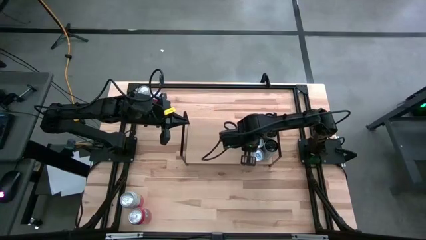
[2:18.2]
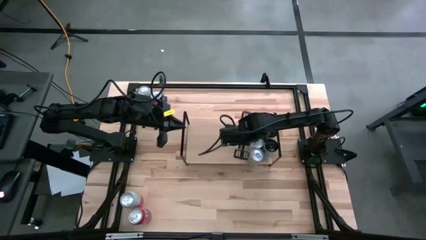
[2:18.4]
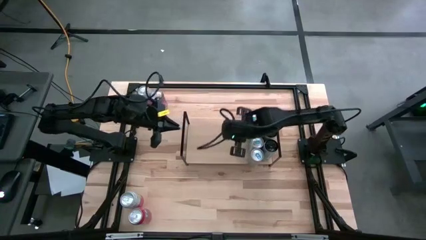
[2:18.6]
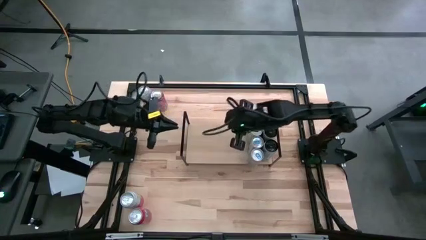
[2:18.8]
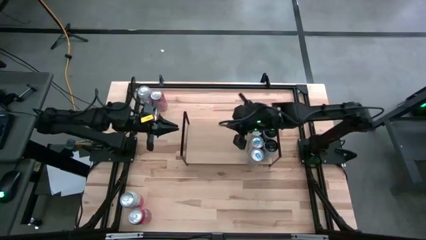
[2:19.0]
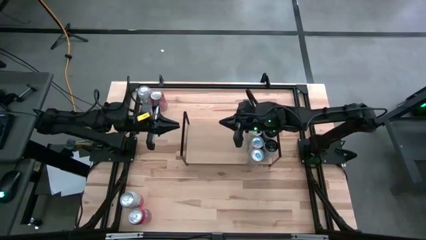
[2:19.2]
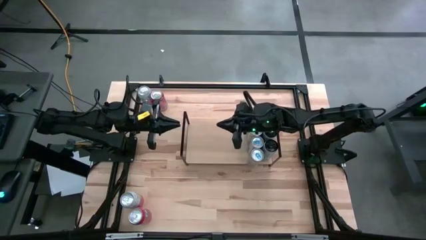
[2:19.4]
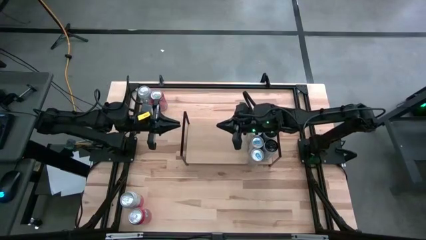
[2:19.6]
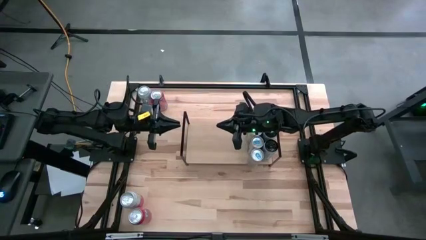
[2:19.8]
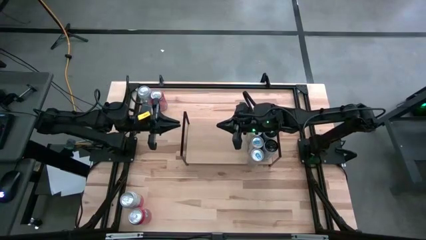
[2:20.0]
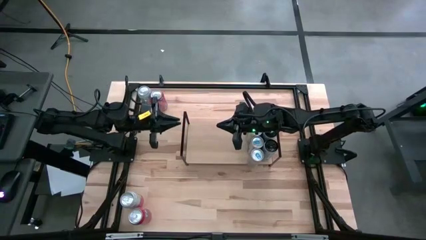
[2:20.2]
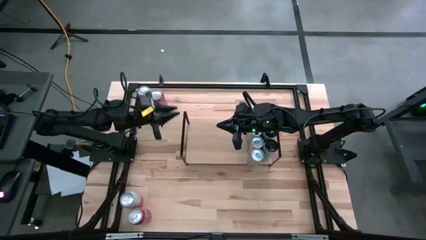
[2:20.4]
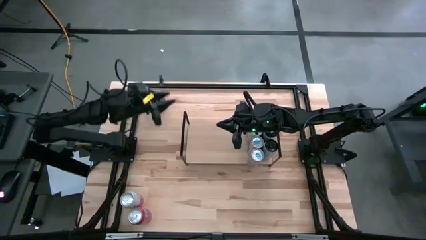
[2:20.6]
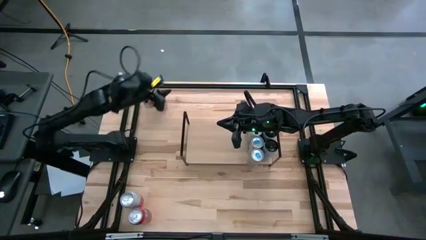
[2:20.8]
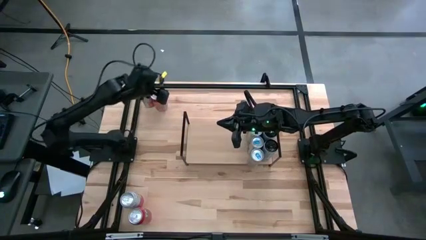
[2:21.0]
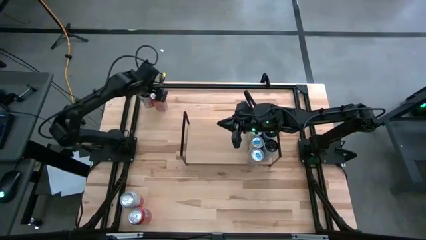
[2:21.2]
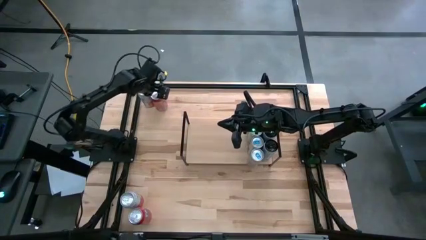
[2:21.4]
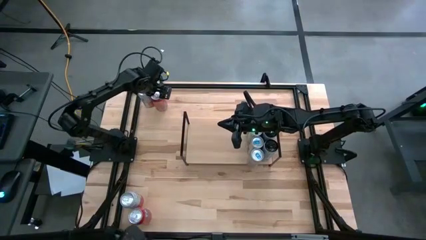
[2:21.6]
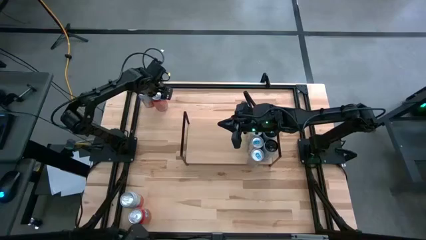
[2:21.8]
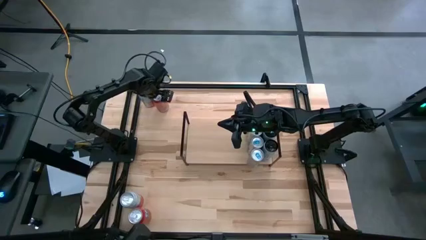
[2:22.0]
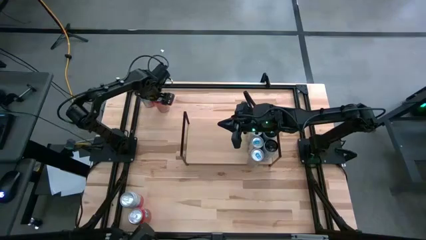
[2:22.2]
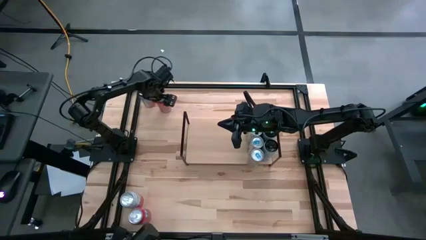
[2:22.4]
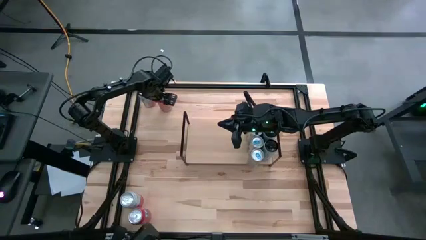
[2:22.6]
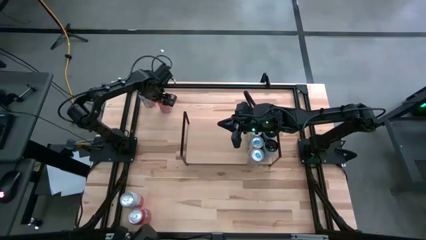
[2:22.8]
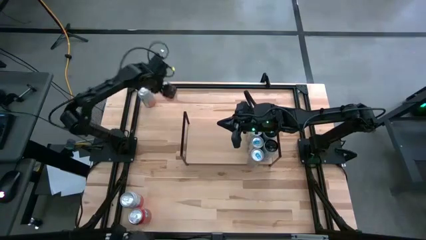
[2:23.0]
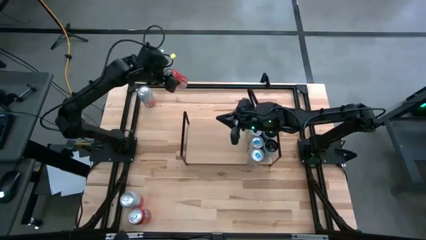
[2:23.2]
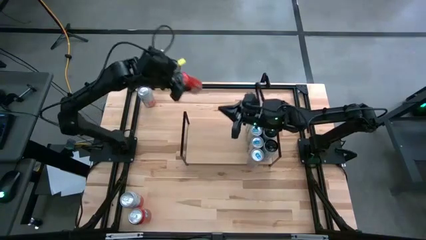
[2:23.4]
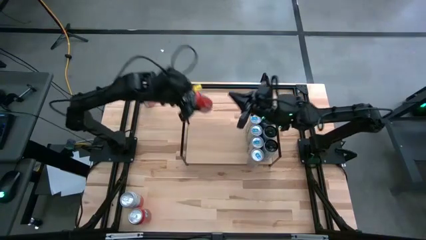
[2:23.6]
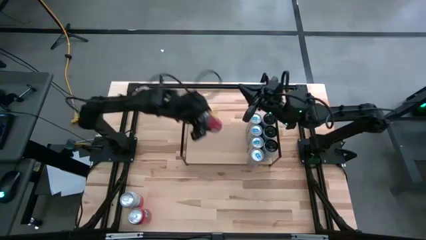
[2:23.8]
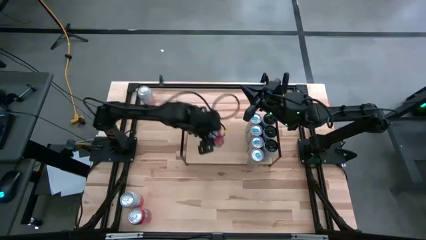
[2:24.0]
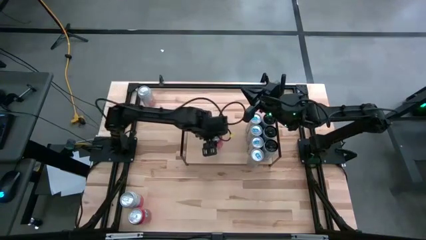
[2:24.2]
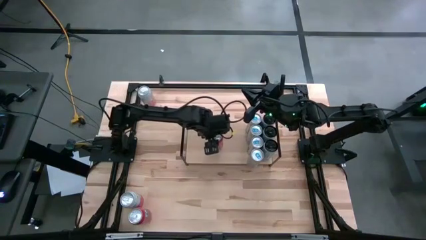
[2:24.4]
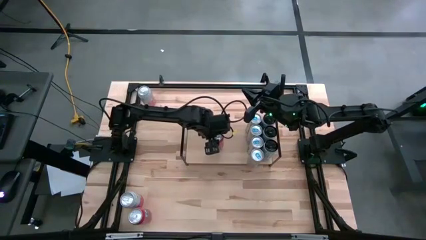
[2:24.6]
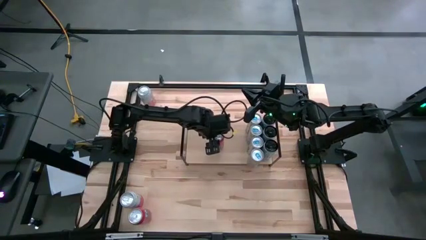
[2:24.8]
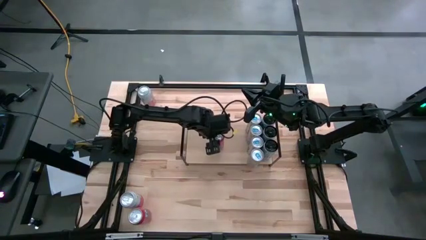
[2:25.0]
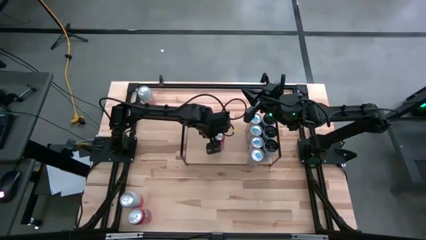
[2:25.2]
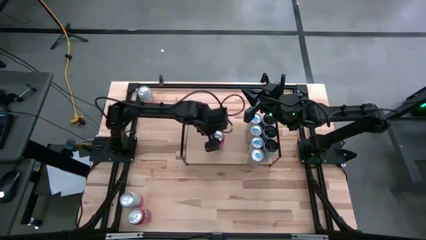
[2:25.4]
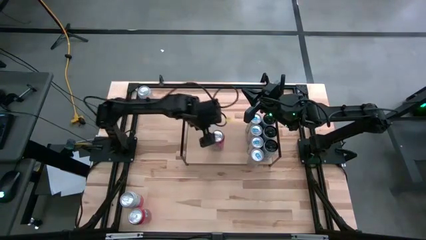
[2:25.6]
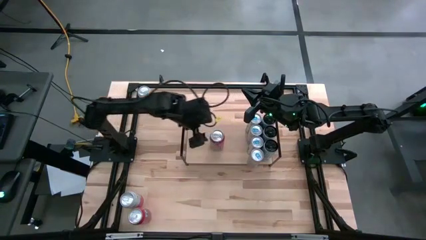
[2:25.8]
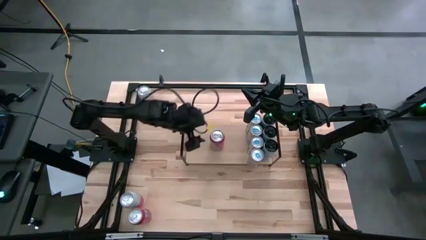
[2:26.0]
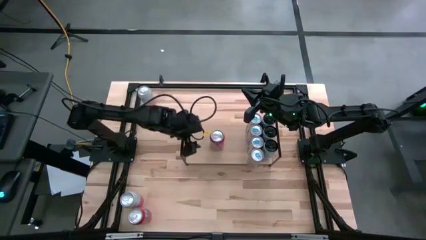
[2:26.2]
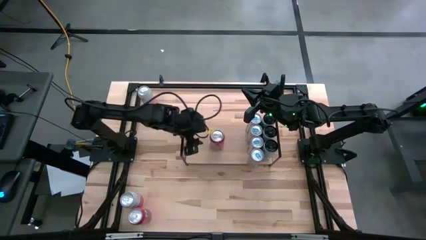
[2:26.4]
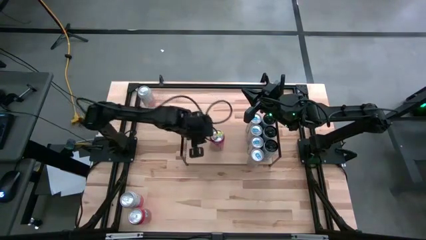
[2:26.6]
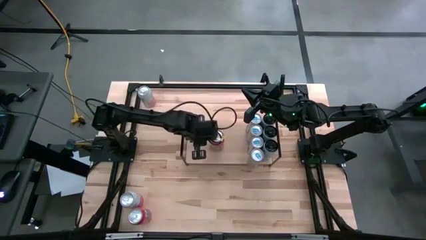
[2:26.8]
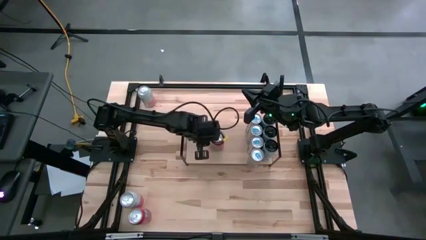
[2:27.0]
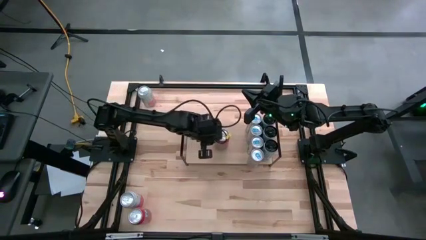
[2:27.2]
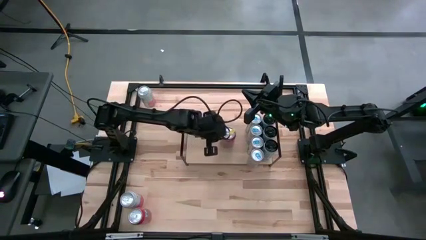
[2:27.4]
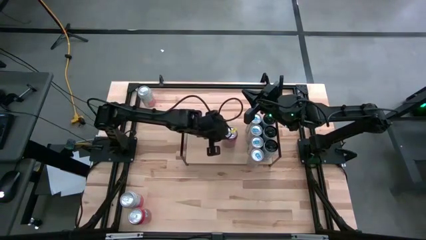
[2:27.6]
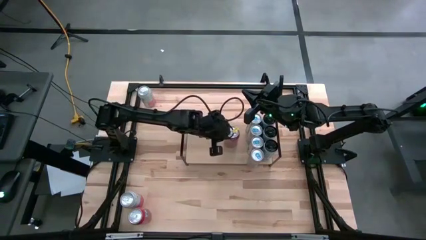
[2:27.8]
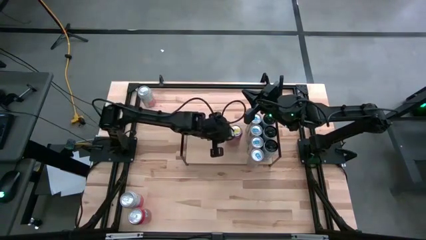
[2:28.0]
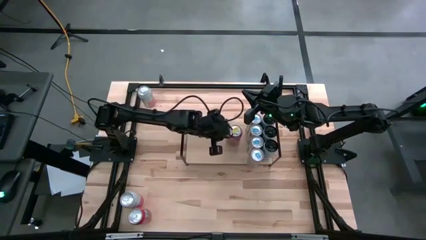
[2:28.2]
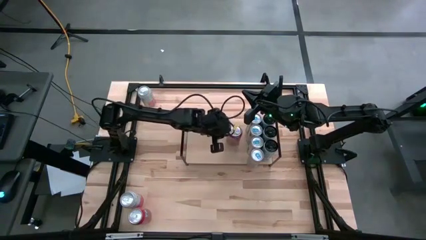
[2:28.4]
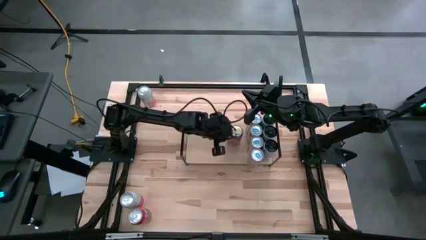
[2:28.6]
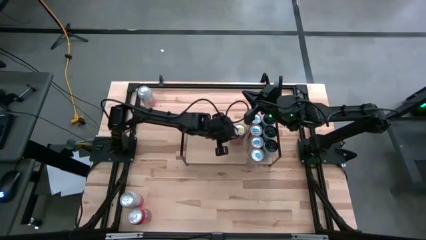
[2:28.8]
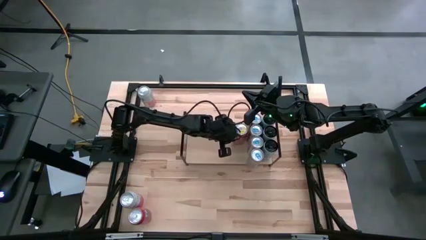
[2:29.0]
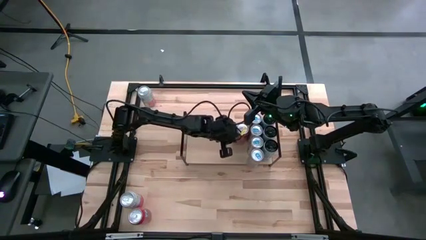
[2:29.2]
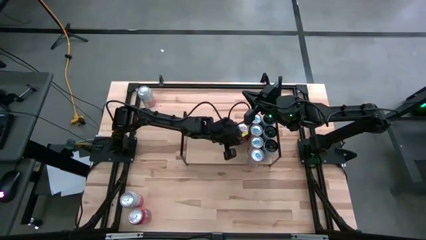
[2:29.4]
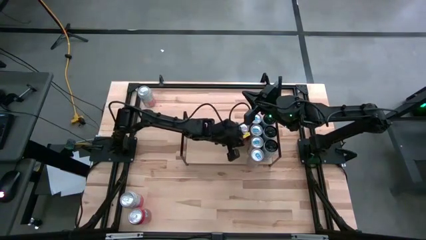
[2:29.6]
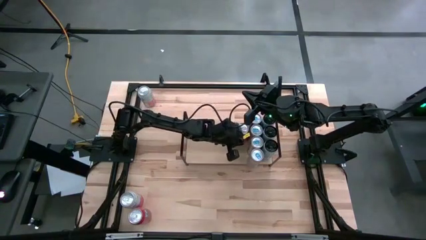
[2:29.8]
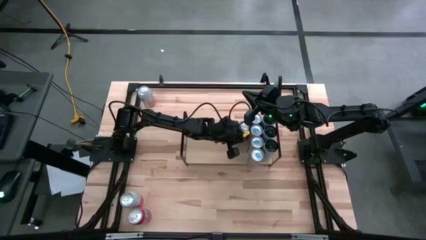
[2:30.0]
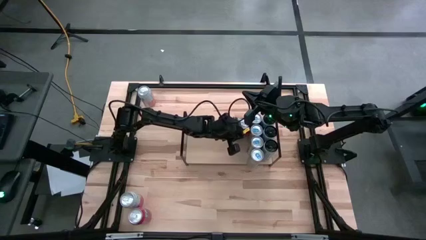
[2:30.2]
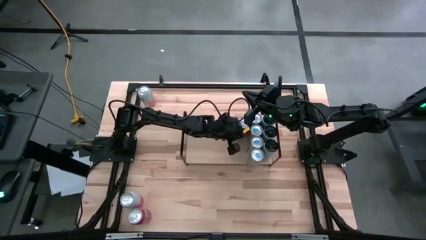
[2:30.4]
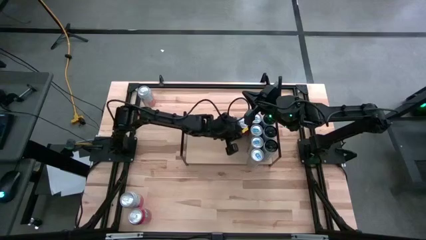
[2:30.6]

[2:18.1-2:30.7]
Task: Place canned beverage on shelf
Put the red soda can on the shelf

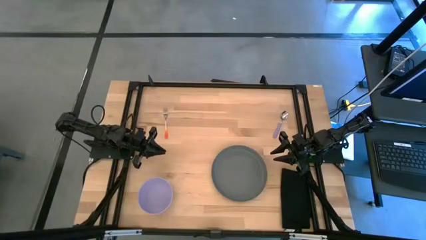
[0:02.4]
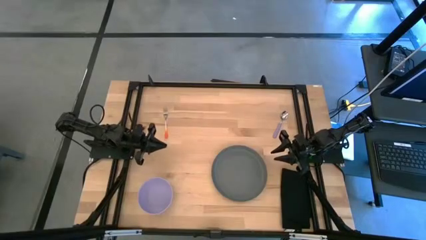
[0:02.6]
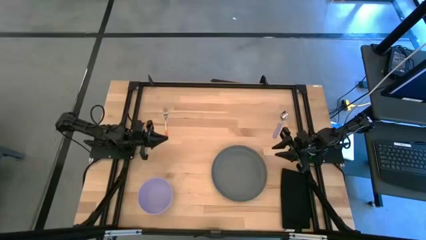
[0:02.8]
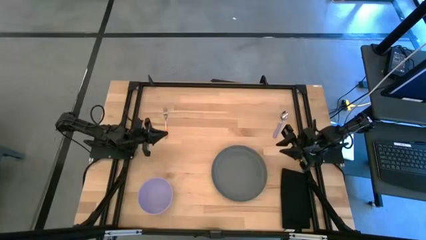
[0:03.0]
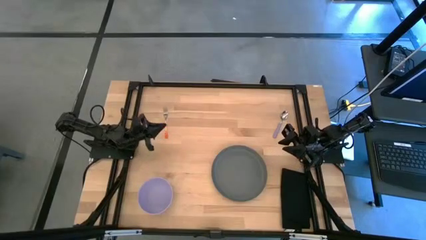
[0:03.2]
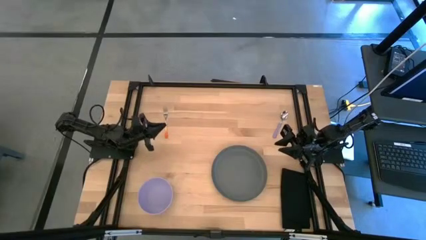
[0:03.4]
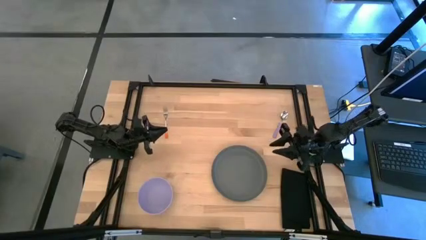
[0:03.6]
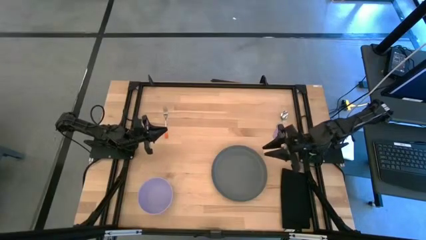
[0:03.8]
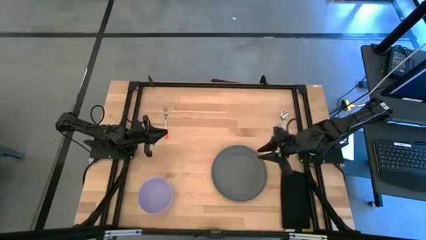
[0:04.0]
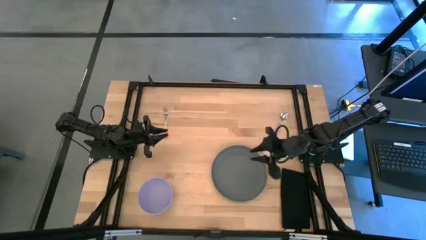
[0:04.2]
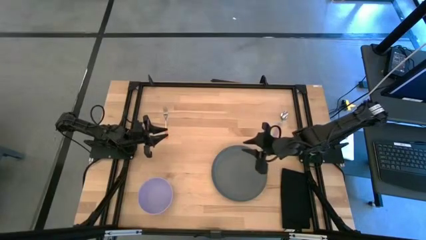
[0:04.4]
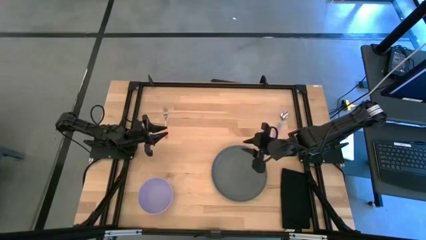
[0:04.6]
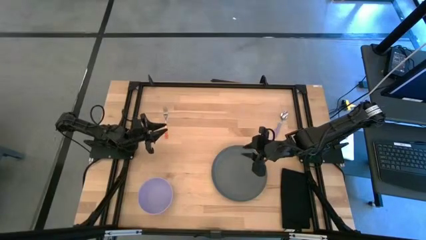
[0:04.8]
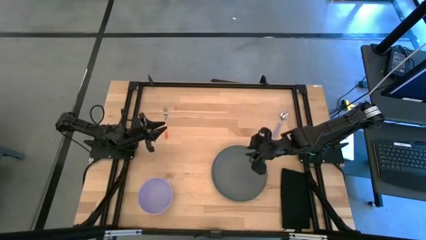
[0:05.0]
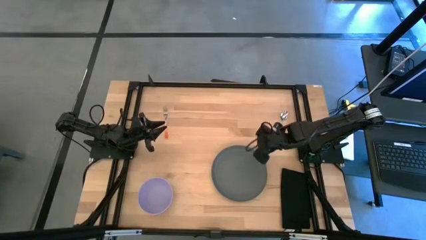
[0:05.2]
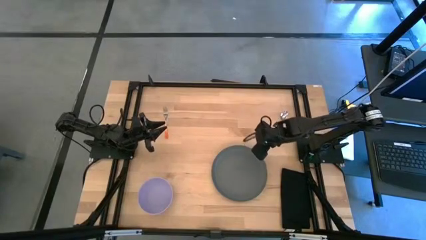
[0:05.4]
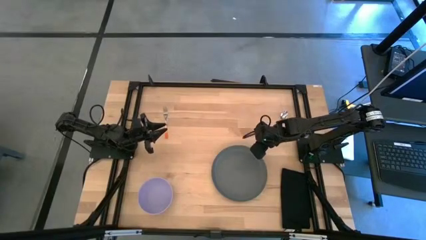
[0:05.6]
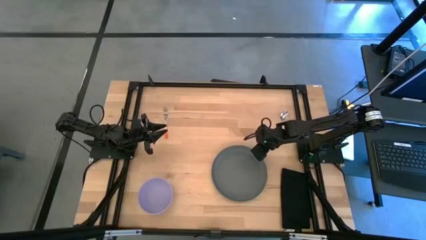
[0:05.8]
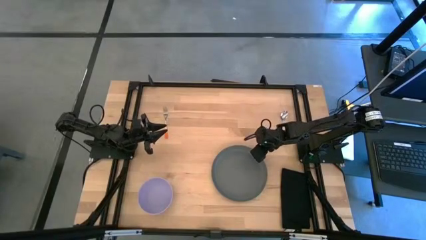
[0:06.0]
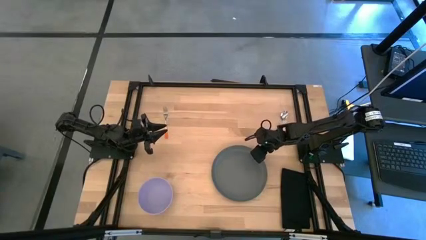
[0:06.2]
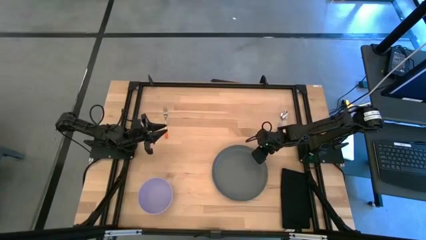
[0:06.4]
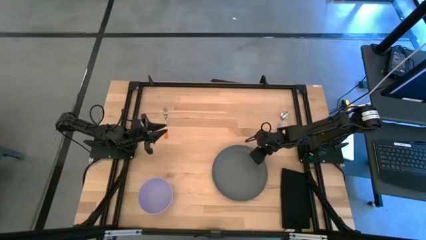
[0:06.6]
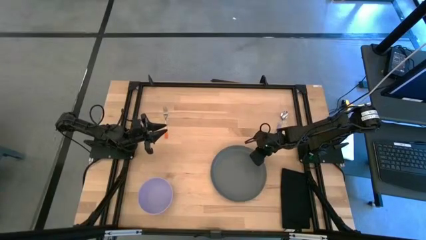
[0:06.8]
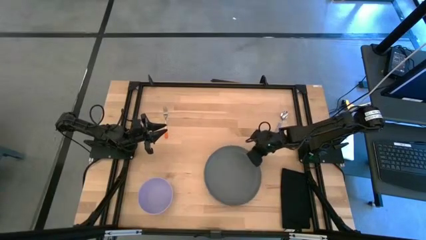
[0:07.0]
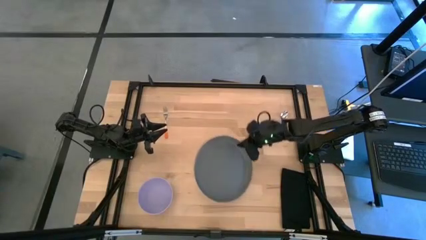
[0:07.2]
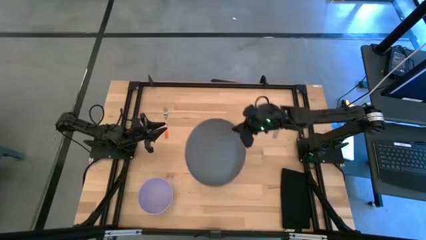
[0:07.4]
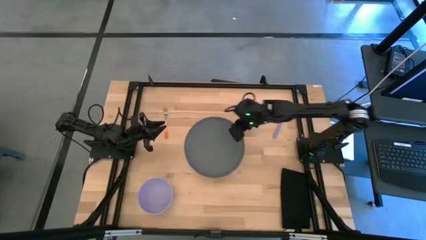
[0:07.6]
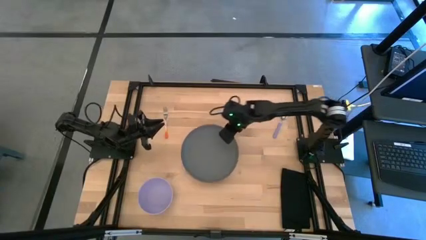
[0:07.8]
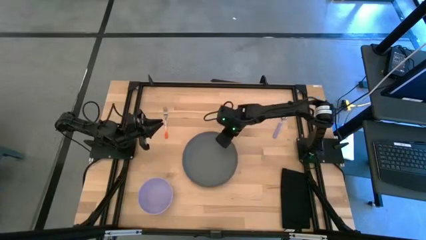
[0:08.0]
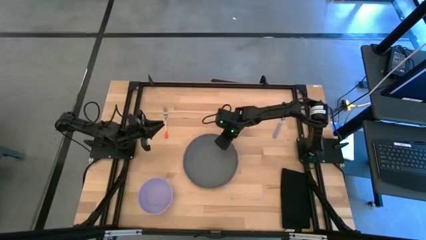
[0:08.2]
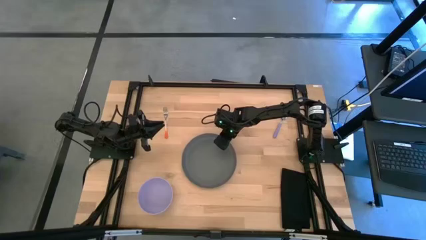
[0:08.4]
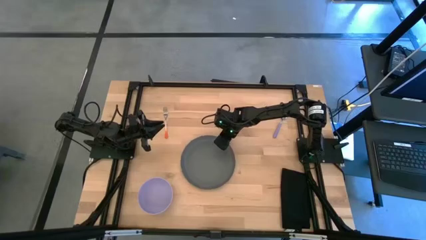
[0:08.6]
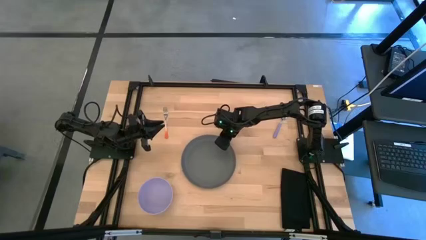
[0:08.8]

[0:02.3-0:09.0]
Task: Set table place
Adjust the grey plate
